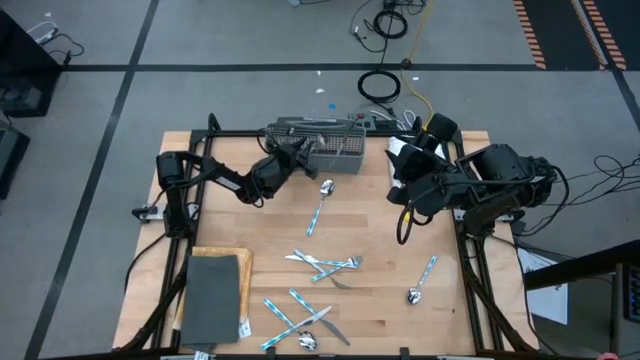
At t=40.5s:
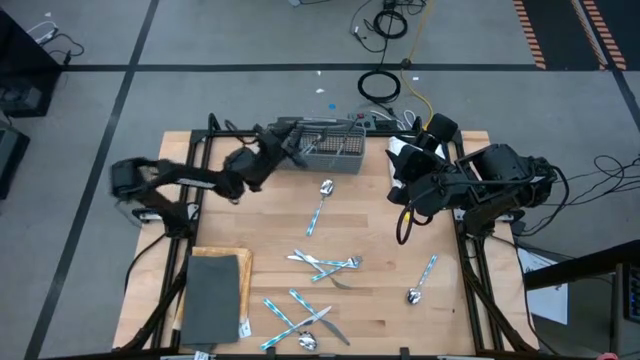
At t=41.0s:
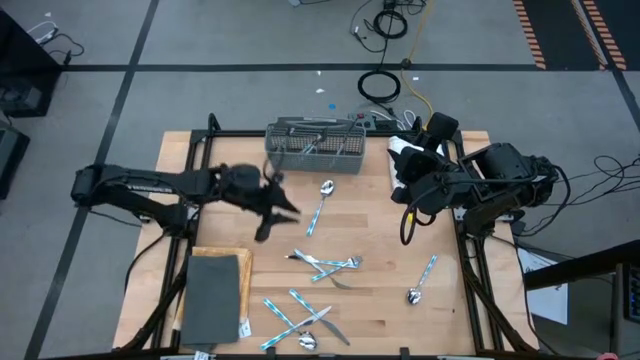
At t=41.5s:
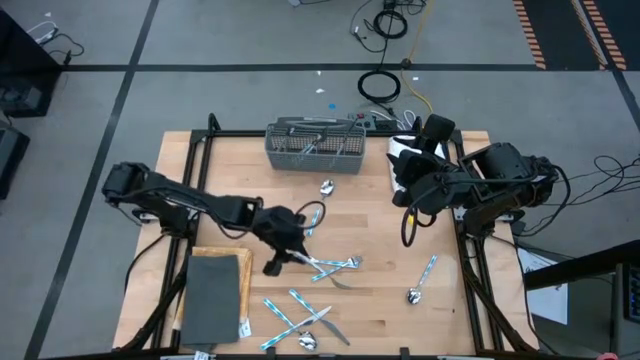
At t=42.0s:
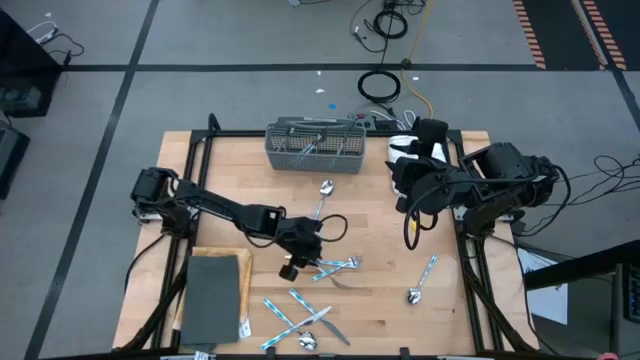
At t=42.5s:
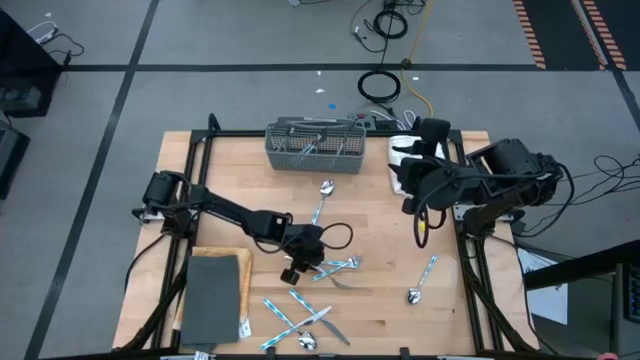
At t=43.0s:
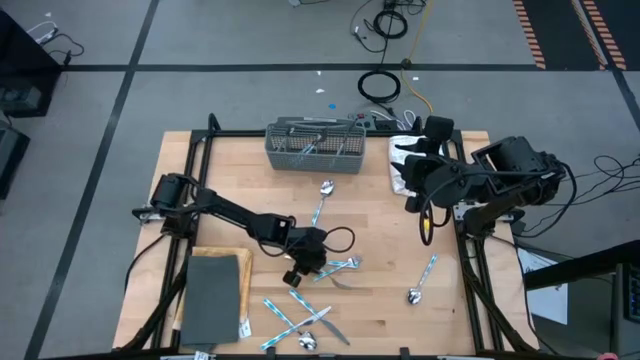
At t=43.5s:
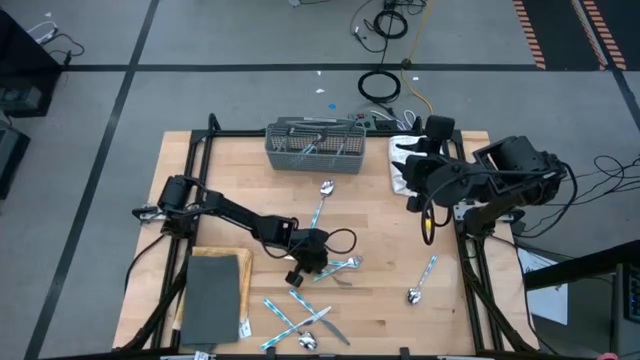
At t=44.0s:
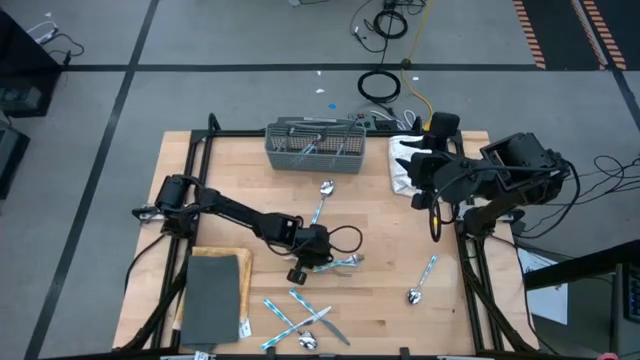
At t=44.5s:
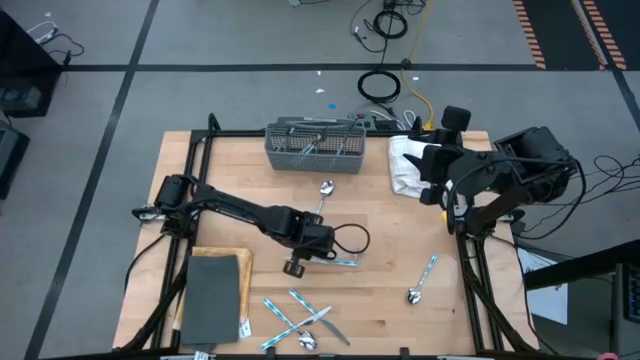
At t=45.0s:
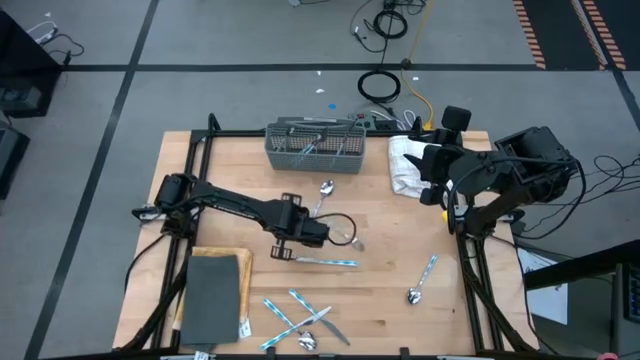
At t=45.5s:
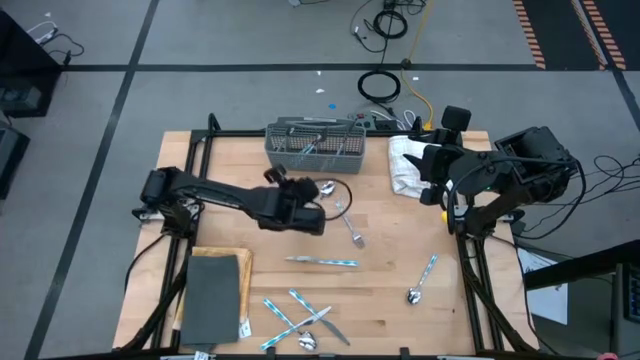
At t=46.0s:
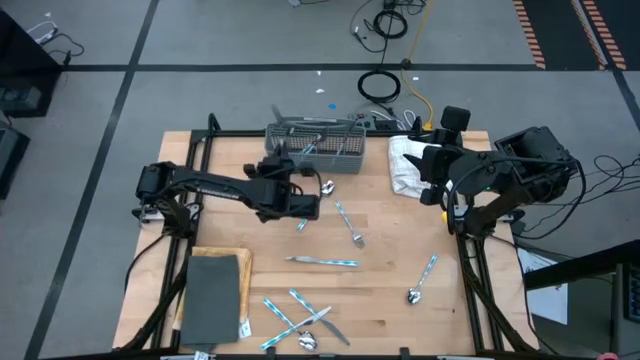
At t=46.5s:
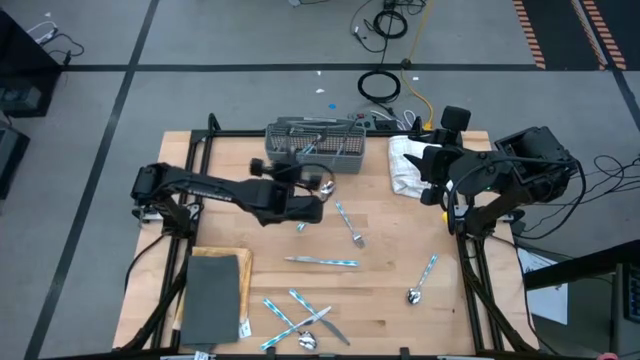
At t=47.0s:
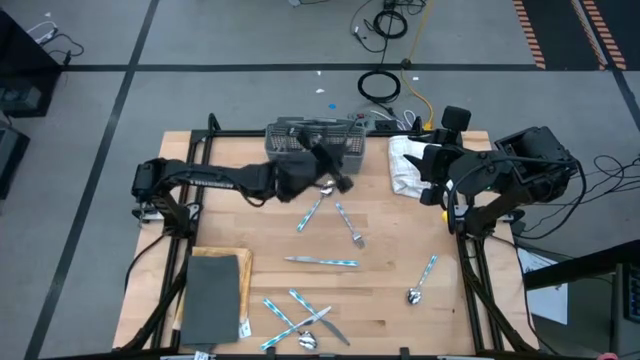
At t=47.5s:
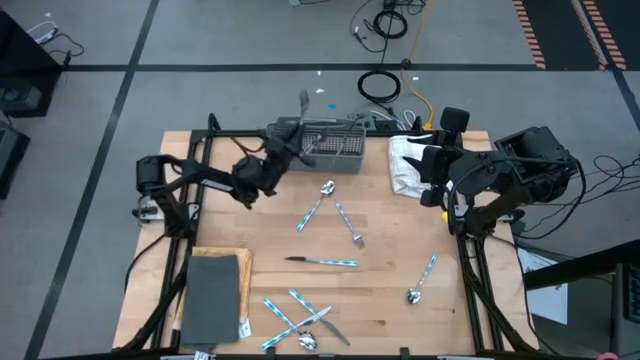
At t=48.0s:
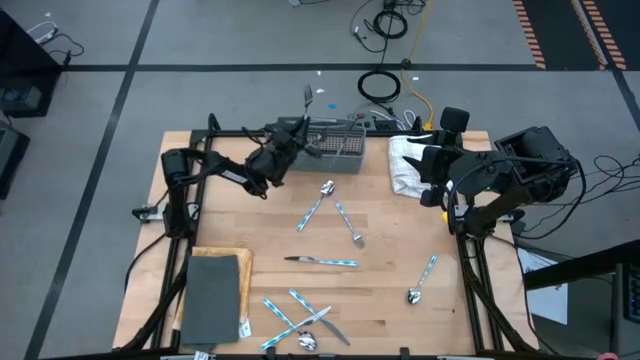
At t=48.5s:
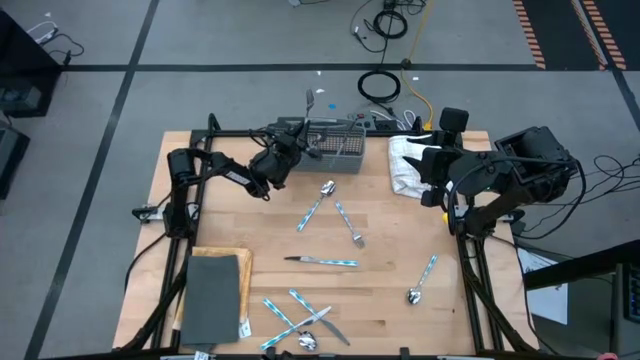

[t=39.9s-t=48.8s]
Task: Sort silverware
Put the blue fork into the silverware basket

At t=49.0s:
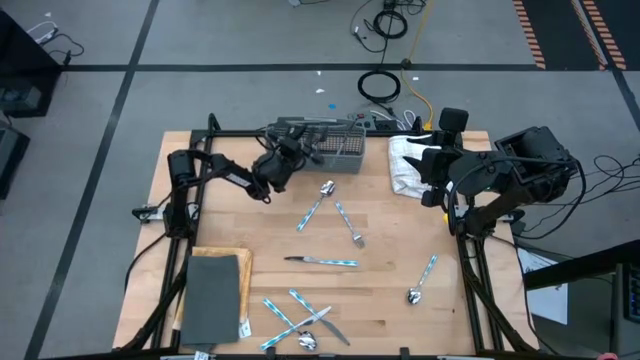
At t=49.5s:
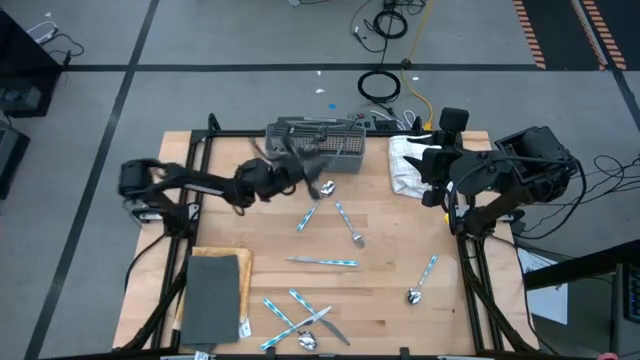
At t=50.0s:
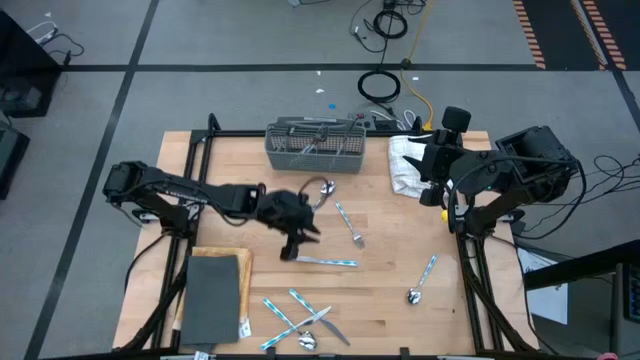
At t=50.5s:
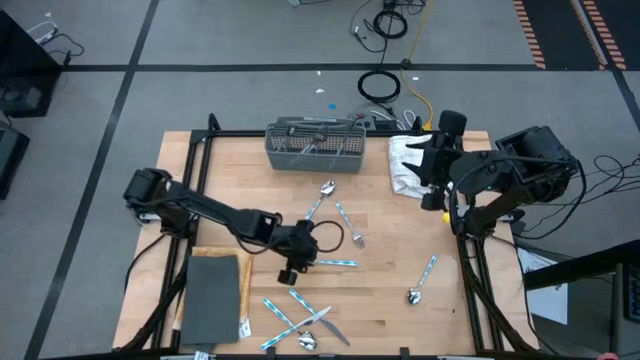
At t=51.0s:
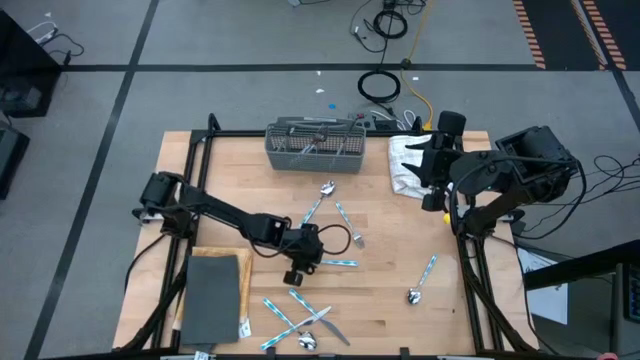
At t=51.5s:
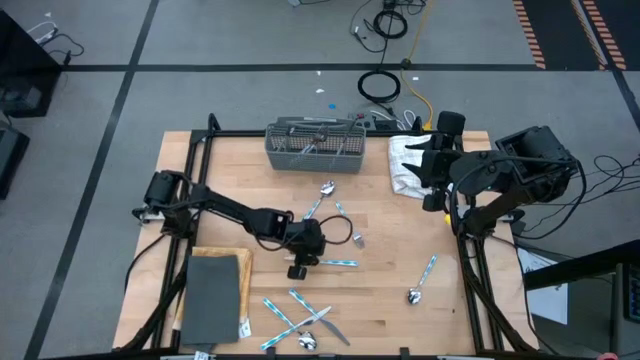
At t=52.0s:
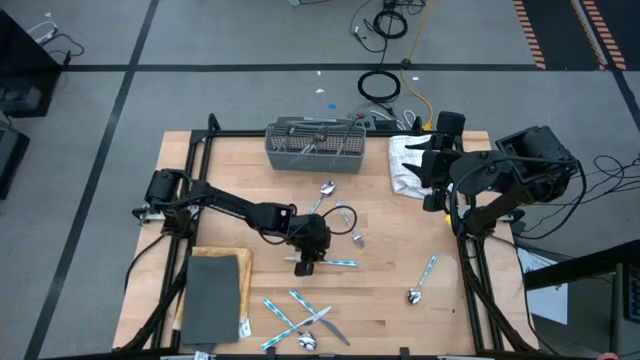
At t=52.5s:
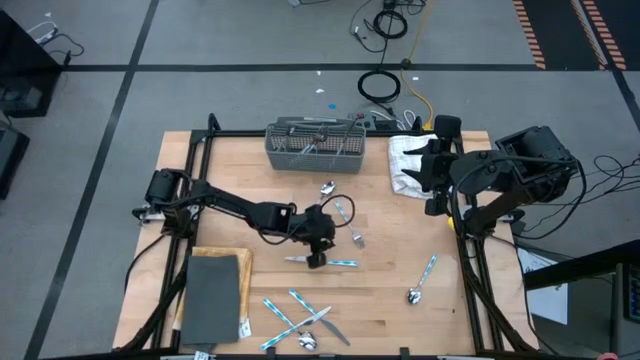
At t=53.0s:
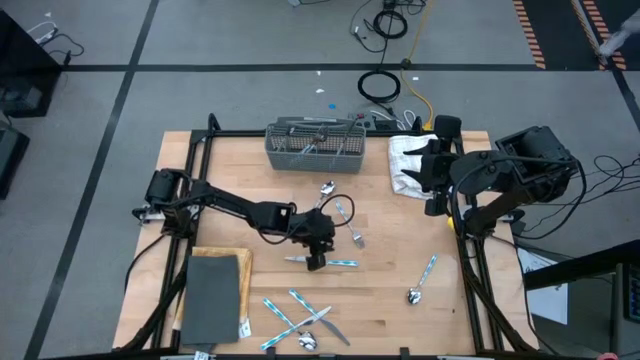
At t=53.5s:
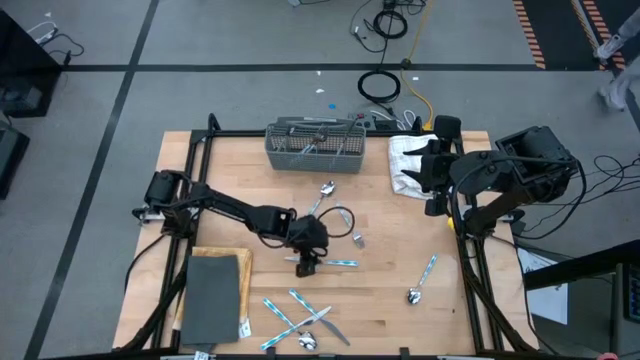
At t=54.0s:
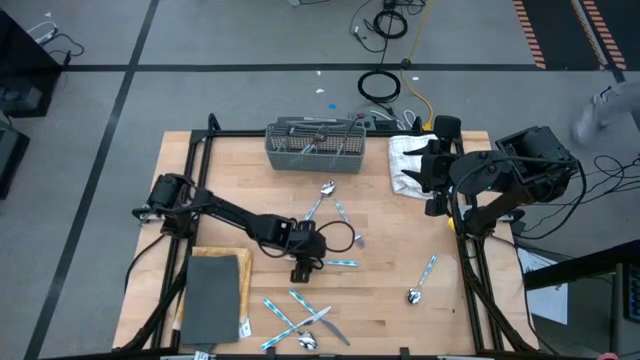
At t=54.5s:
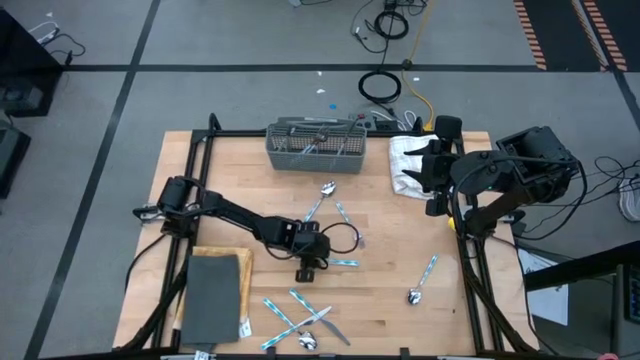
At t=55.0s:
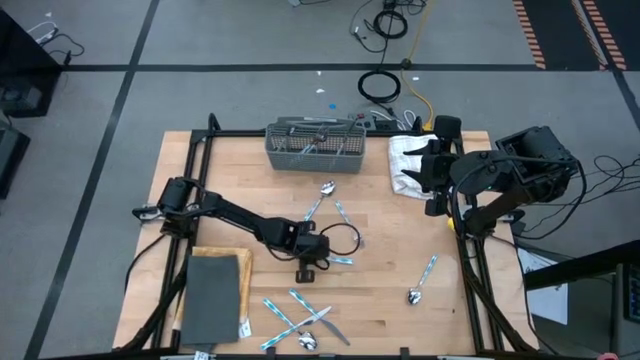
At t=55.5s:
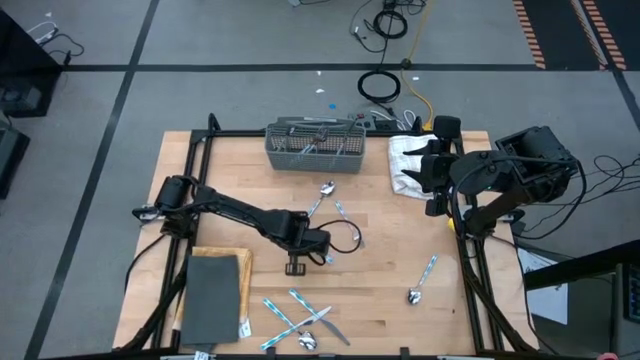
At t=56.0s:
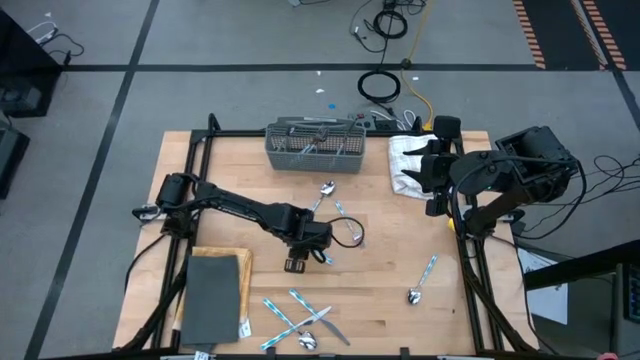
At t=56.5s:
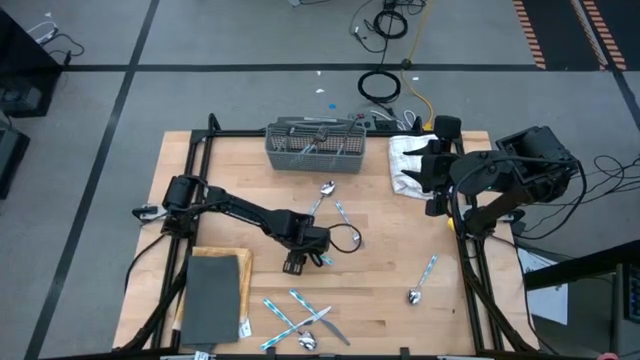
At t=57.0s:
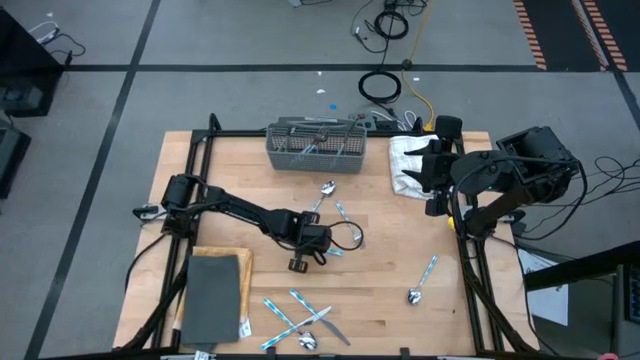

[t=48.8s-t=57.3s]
Put the blue knife into the silverware basket

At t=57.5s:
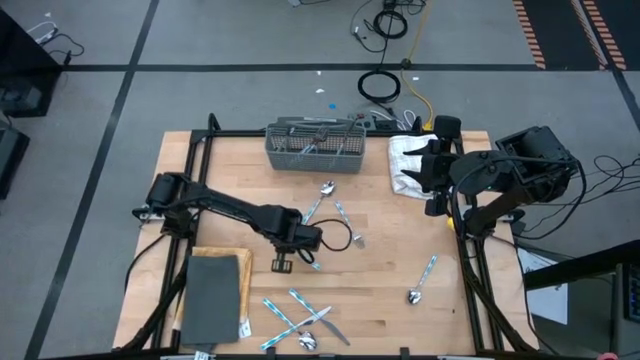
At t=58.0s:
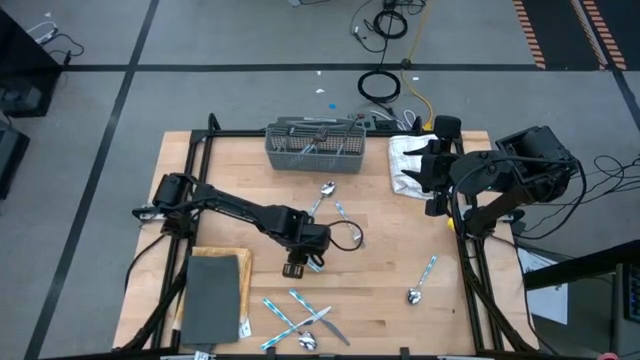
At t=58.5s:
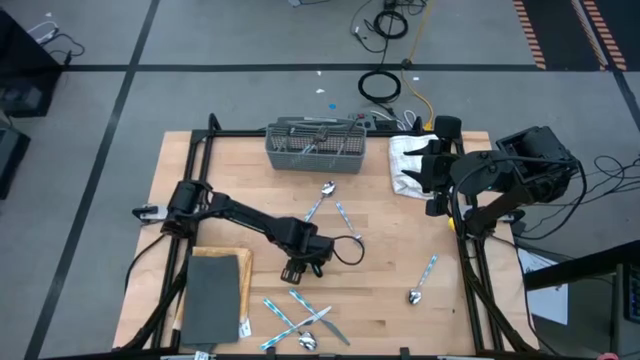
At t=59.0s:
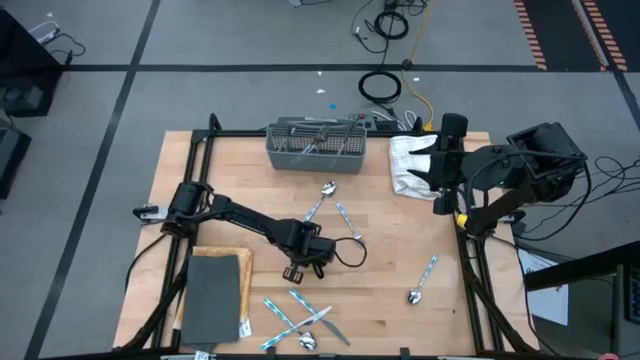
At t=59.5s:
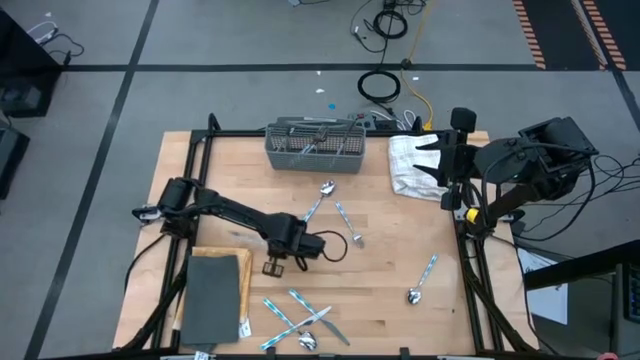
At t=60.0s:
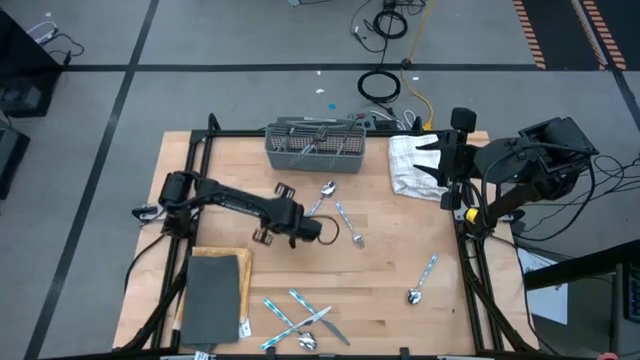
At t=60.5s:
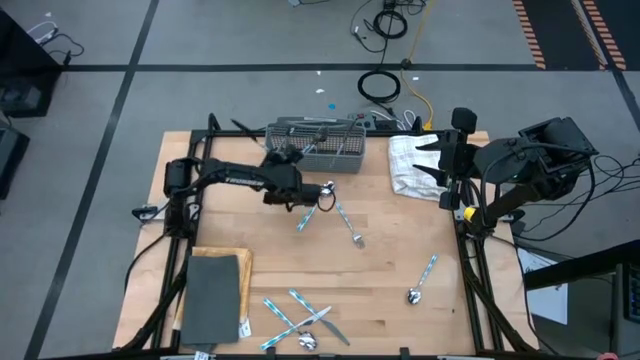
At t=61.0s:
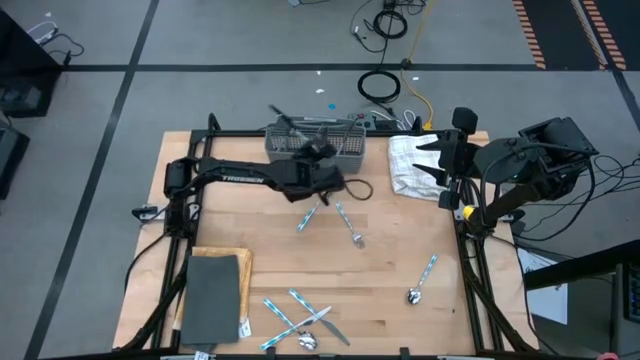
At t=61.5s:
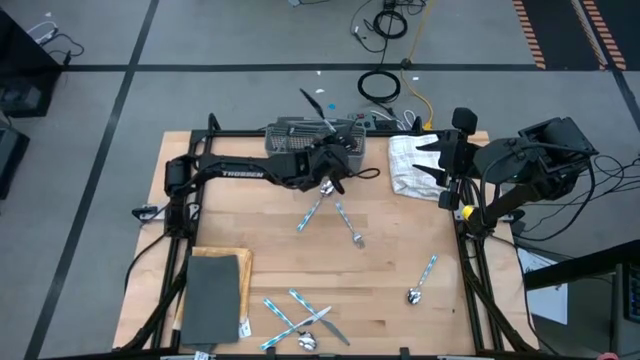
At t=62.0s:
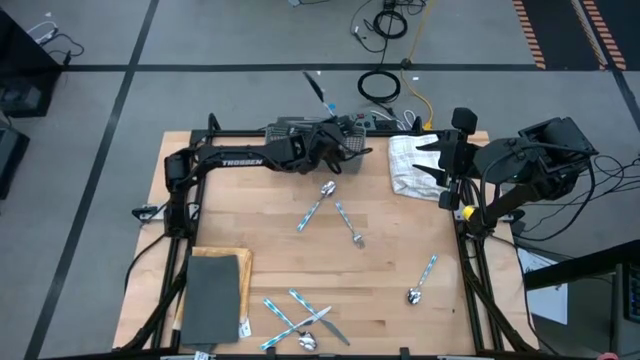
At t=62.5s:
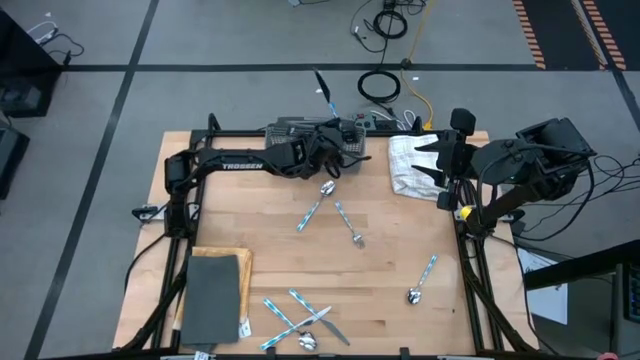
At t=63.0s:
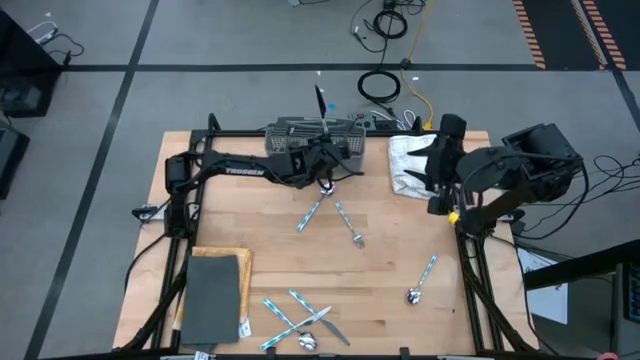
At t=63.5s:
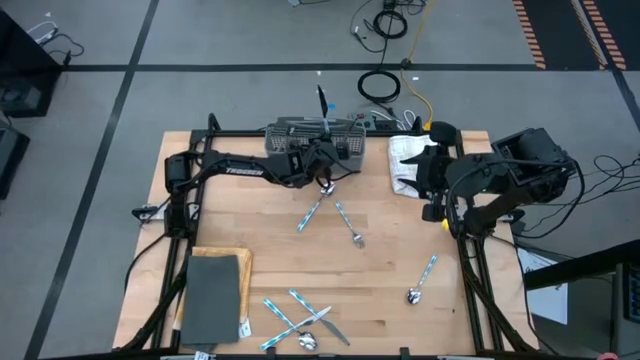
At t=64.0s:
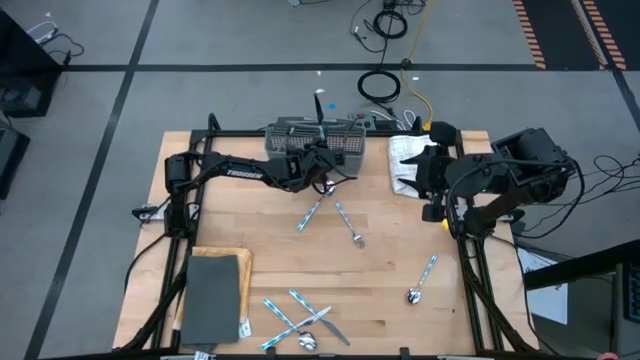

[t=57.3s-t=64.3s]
Put the blue knife into the silverware basket
